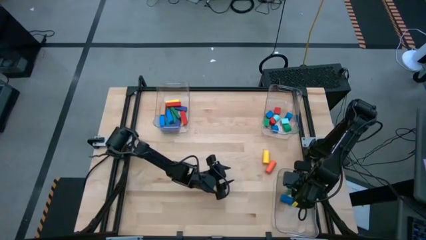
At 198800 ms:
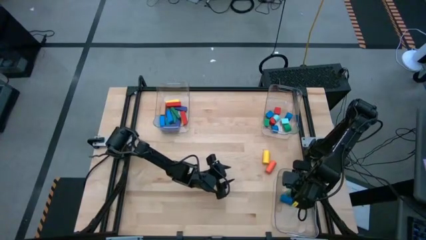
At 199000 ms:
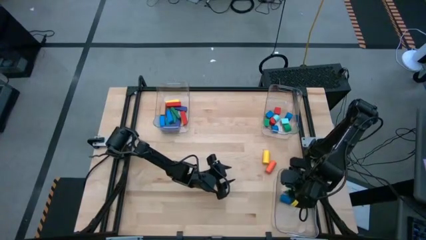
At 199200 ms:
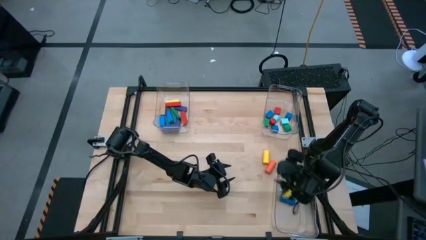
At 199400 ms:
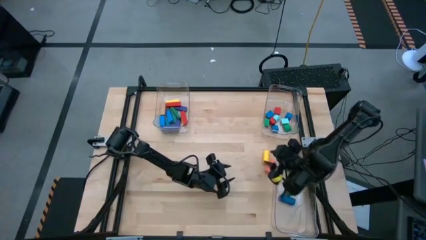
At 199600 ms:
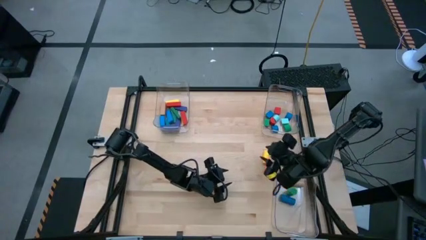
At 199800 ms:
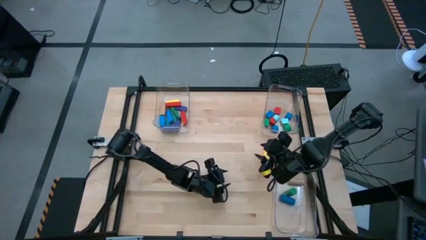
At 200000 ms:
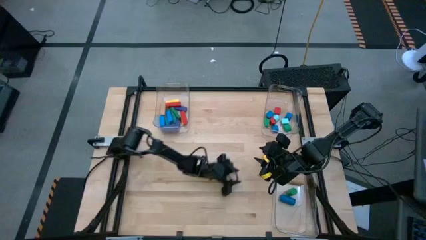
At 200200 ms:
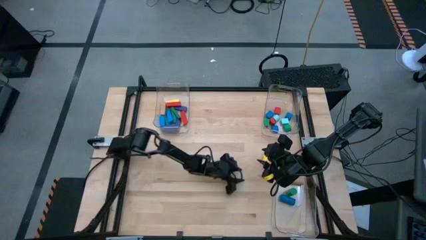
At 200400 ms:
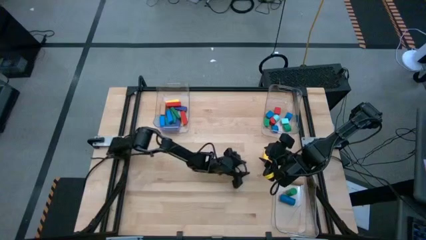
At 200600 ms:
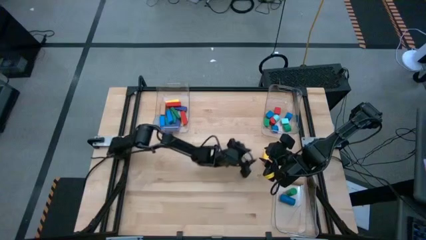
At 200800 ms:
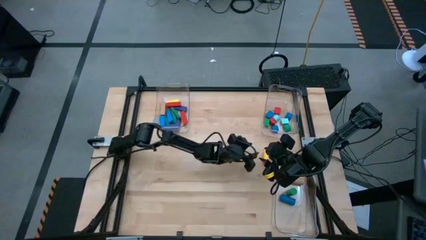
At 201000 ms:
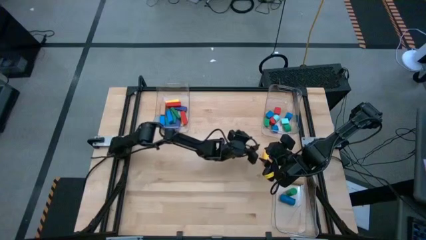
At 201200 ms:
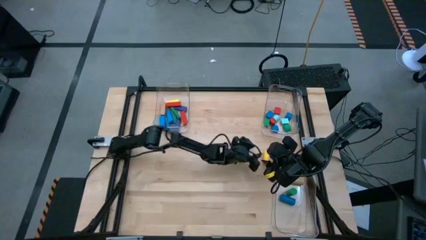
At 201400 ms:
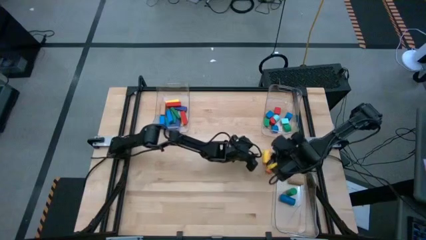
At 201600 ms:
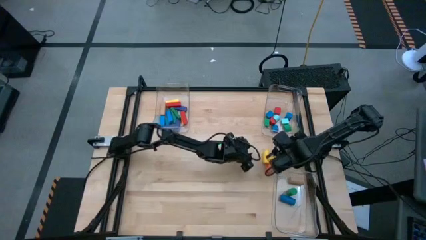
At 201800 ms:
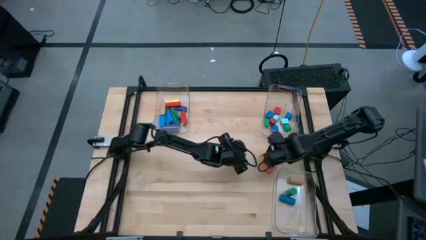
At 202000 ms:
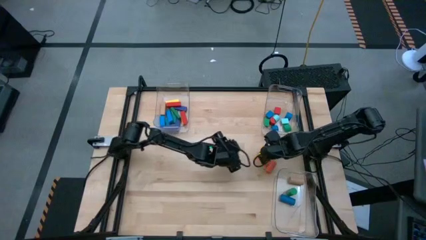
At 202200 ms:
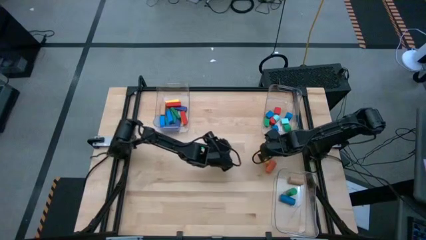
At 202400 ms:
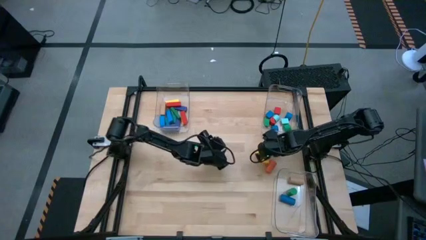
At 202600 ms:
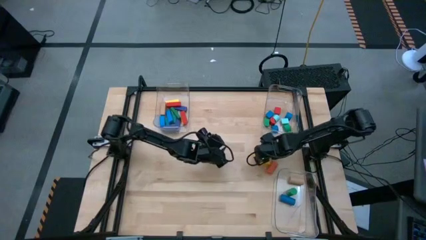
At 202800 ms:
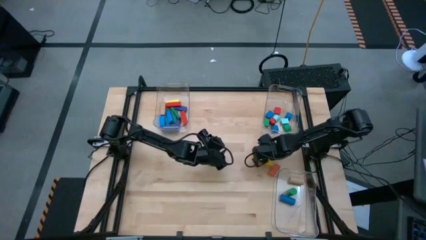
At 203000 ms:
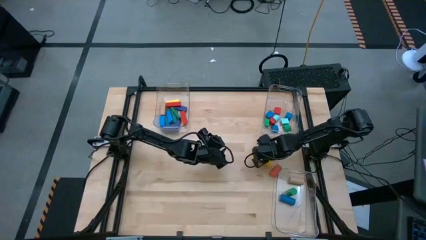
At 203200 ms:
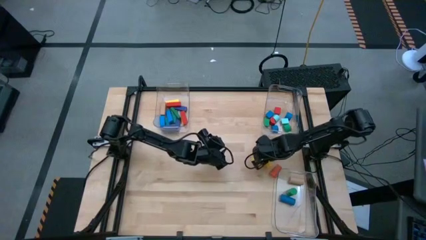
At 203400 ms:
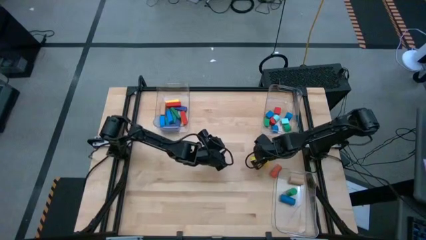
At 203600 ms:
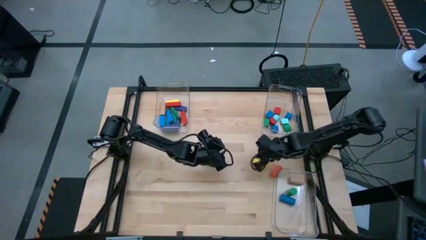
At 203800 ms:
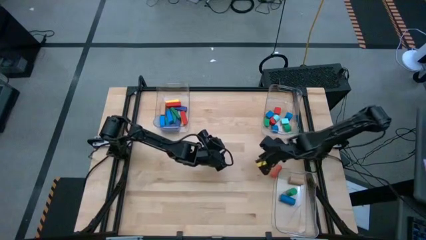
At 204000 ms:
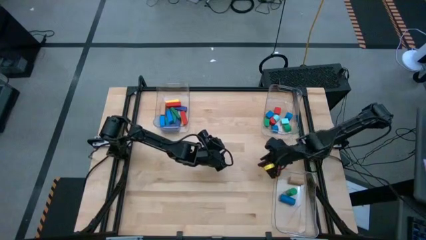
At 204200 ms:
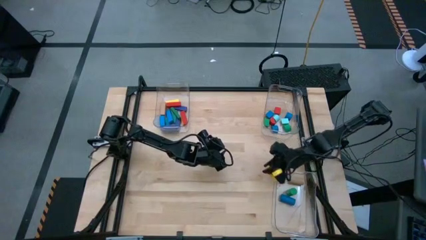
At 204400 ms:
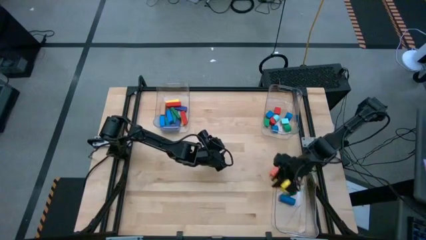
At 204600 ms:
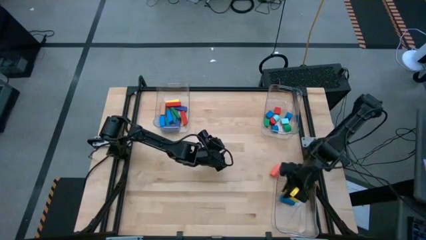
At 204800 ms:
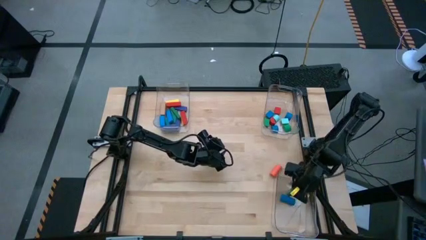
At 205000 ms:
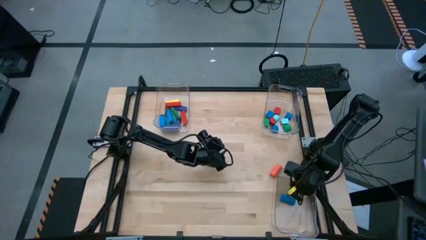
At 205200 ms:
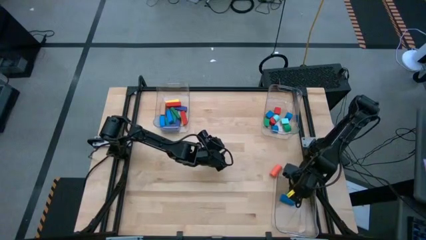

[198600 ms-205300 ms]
Task: Sort blocks by size
Put the yellow cylindrical block into the bottom transparent bin

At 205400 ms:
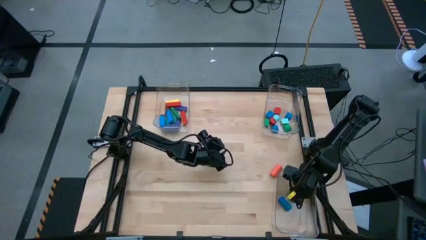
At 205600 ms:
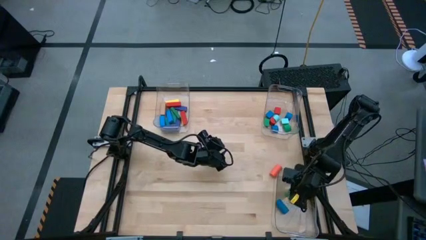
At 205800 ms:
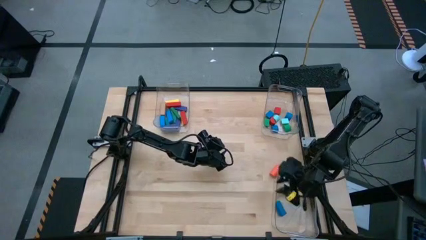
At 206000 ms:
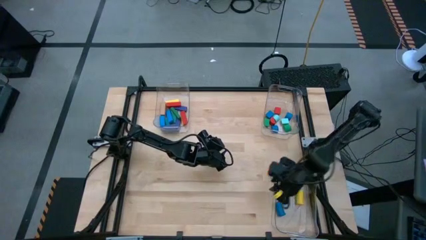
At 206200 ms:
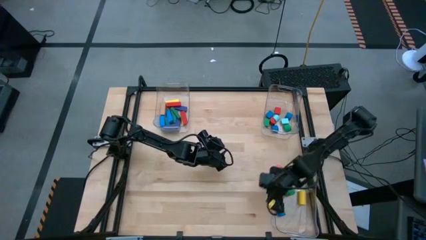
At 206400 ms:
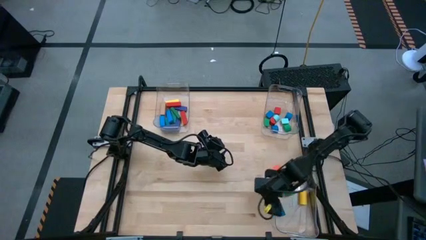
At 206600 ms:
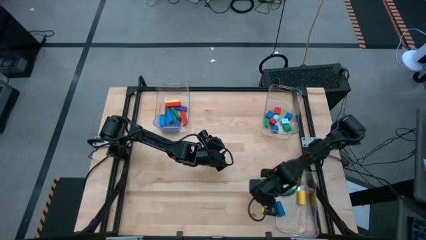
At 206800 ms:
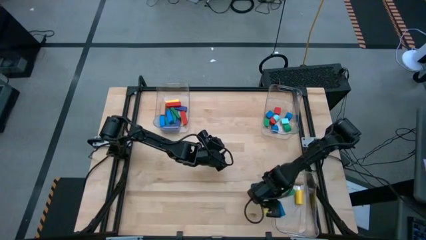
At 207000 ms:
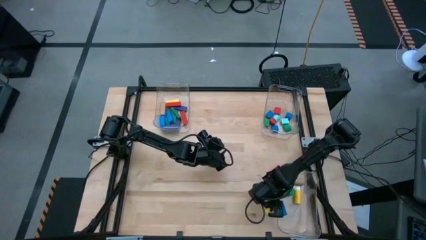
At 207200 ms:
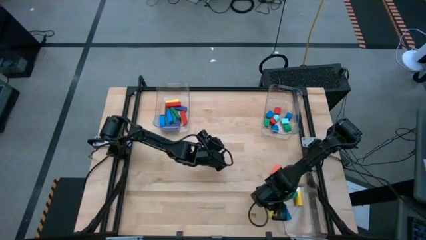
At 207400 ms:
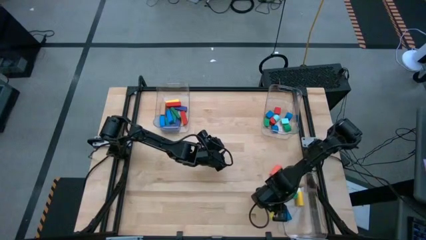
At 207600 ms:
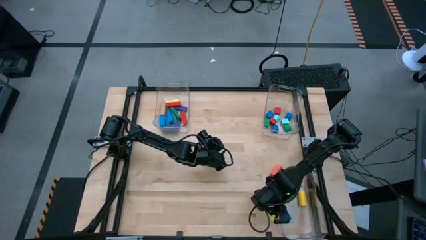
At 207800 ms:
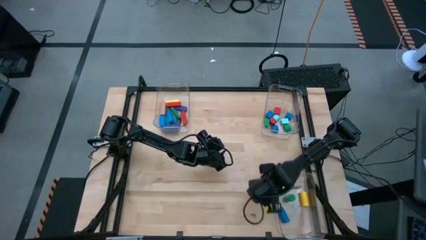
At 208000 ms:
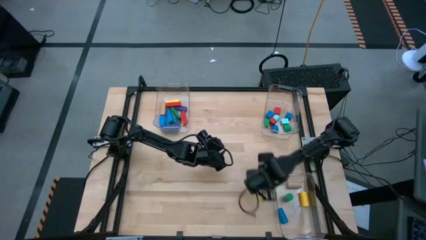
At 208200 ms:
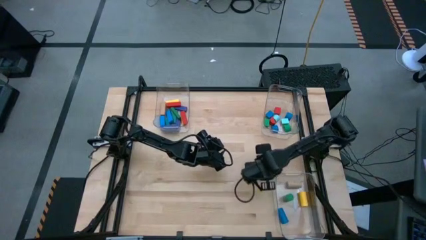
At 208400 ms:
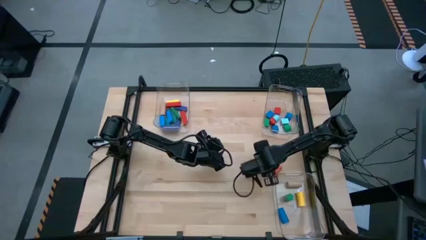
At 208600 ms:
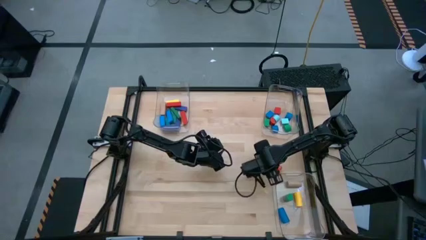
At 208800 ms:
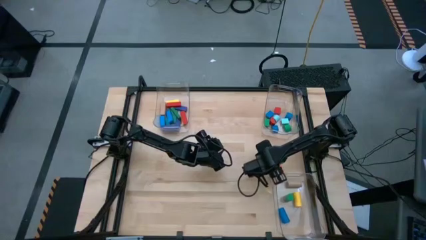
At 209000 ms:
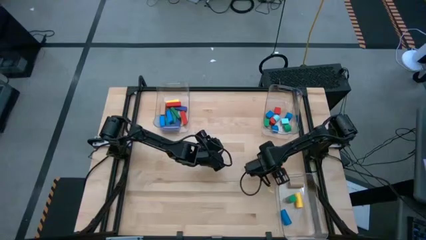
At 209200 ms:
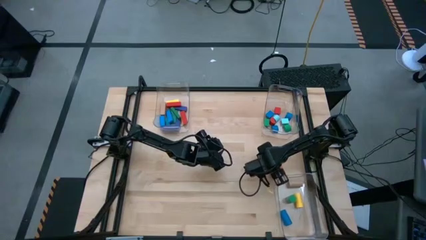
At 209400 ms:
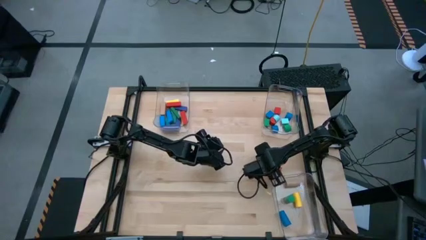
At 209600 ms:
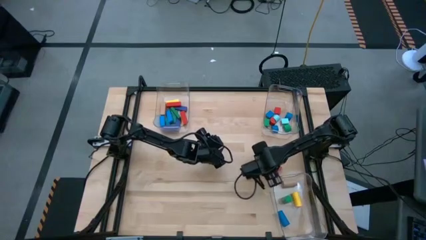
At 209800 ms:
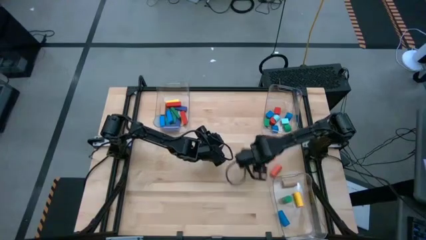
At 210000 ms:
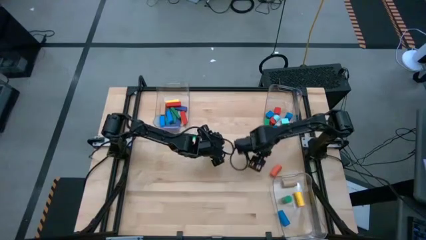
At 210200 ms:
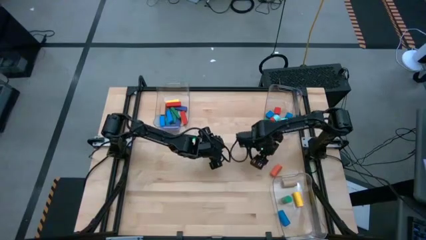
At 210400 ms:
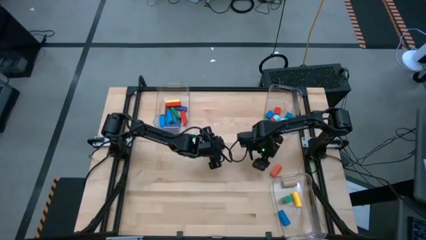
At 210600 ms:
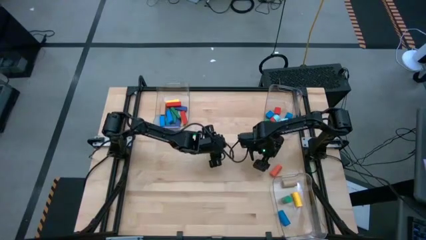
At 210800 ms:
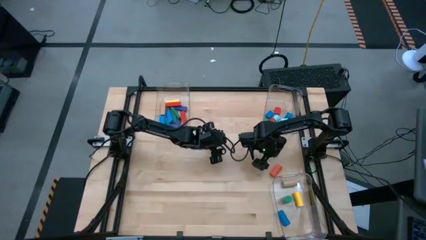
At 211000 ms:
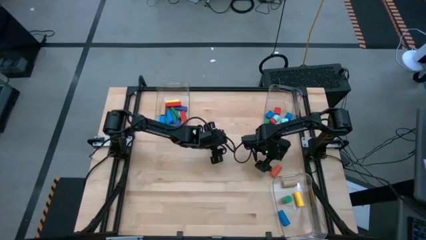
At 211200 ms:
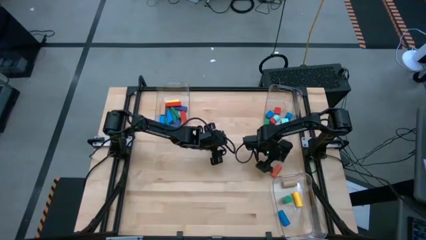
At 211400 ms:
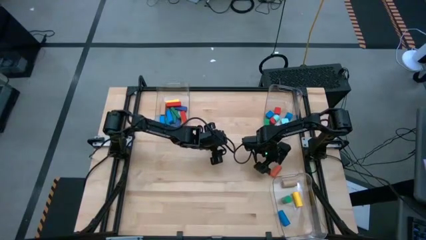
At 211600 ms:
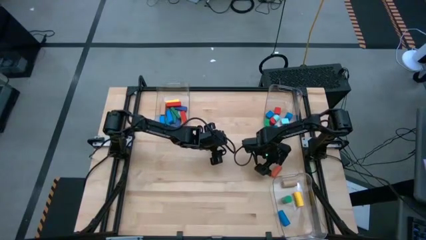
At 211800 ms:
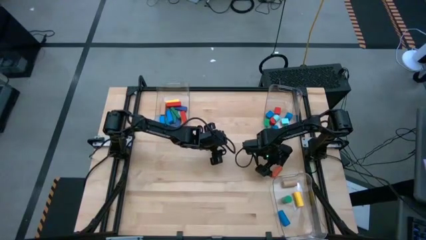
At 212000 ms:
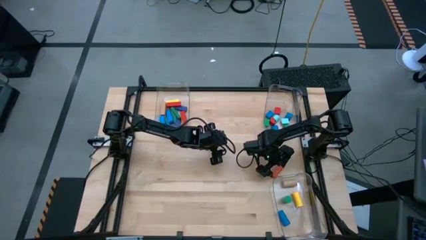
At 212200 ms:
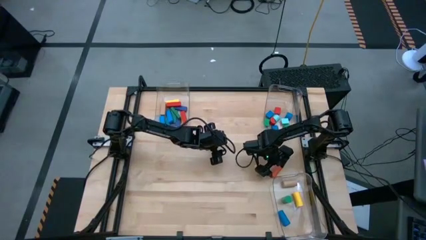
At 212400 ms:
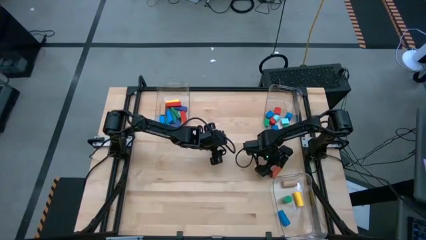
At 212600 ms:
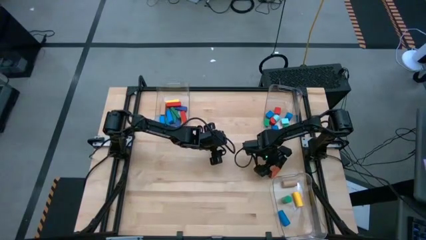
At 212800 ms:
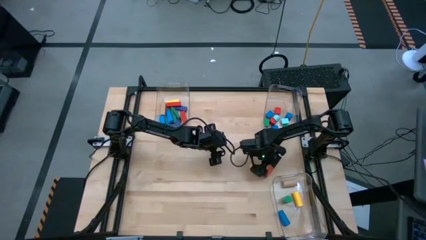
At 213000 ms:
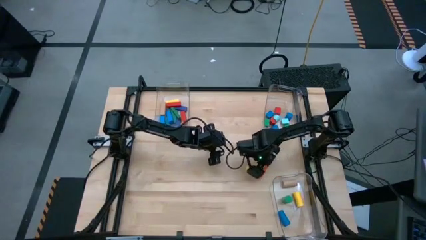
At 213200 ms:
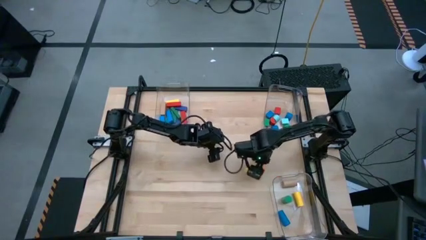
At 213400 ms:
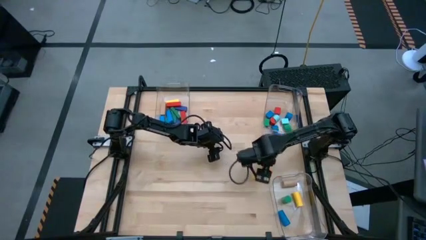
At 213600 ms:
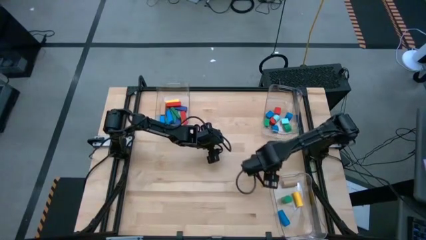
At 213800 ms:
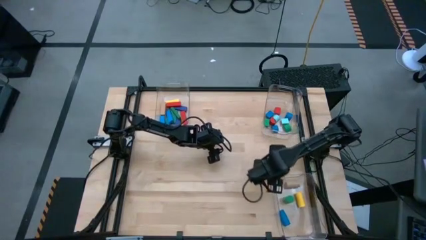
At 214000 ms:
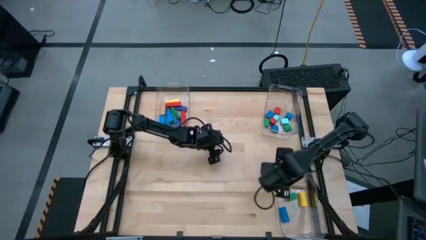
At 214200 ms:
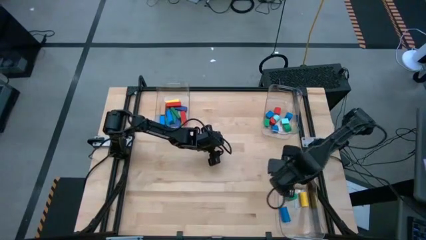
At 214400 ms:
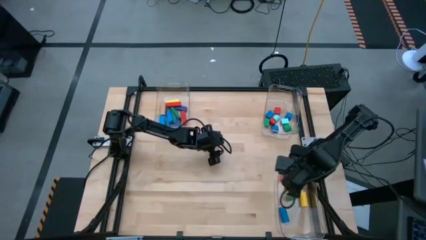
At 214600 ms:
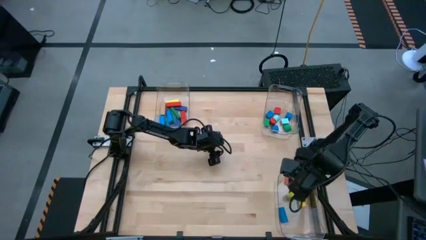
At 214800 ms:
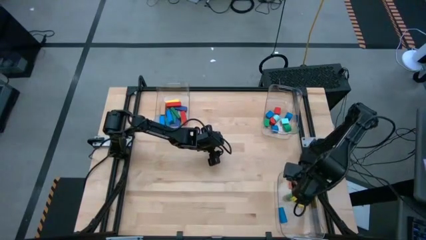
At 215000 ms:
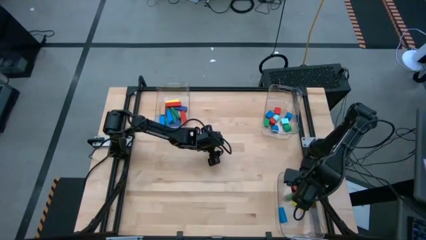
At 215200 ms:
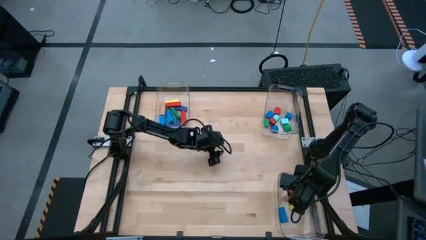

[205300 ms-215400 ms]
Put the orange cylindrical block into the bottom transparent bin
